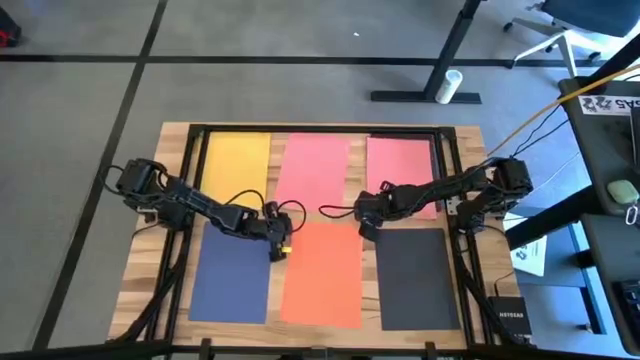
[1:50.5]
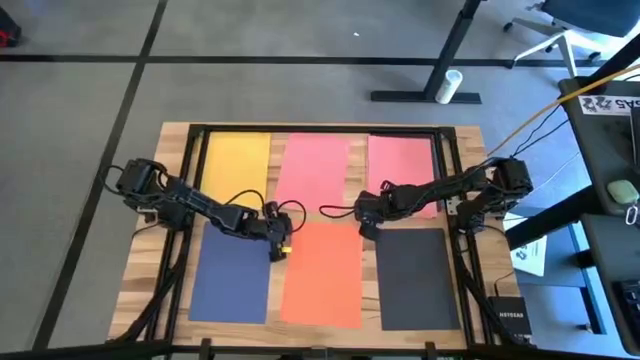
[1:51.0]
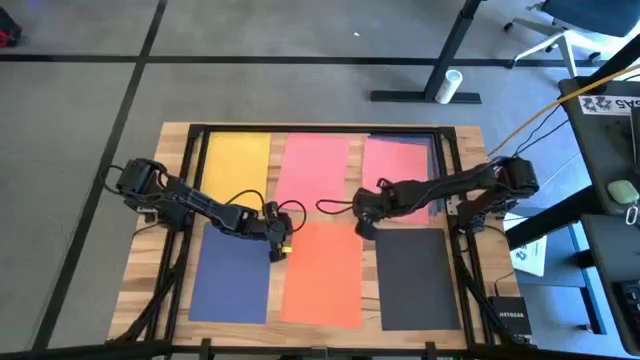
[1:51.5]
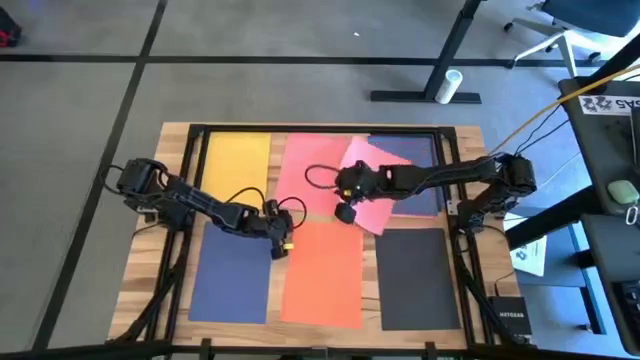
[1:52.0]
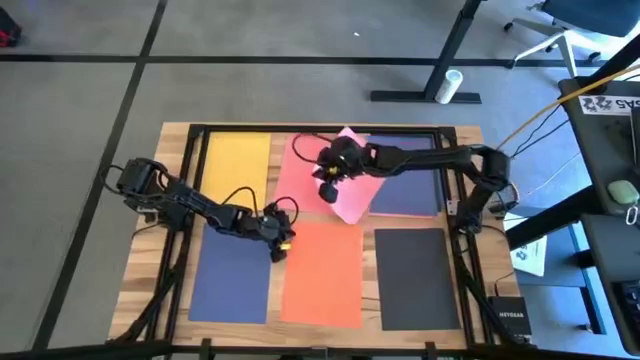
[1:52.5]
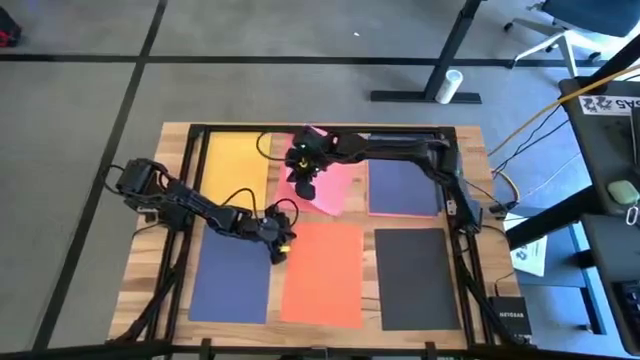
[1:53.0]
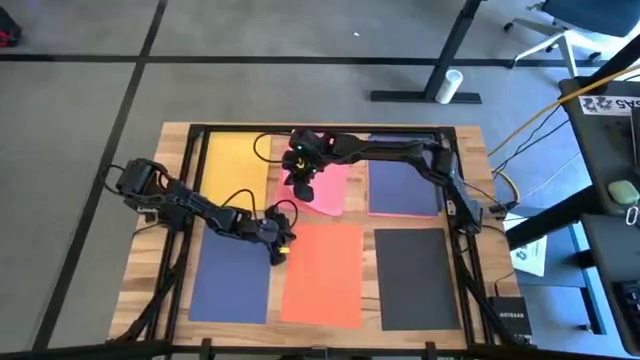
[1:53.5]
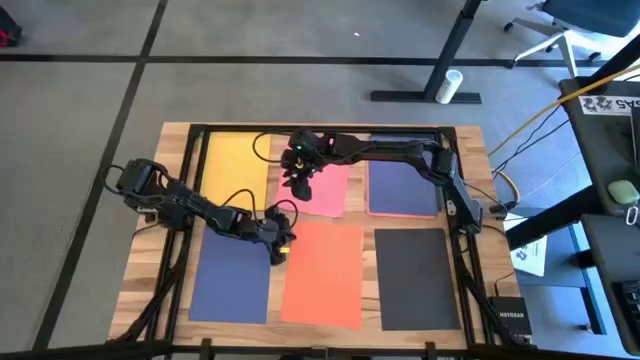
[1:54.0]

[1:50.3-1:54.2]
Task: Organize paper
Stack the pink paper on top of the pink paper

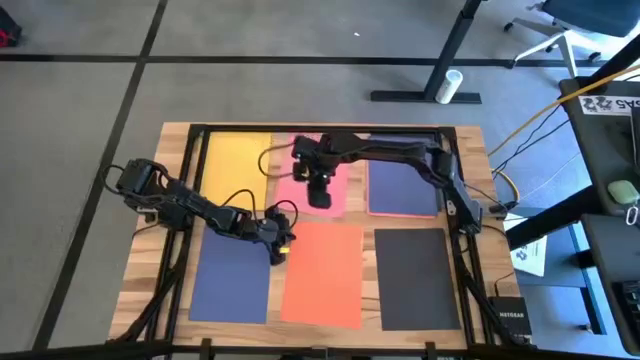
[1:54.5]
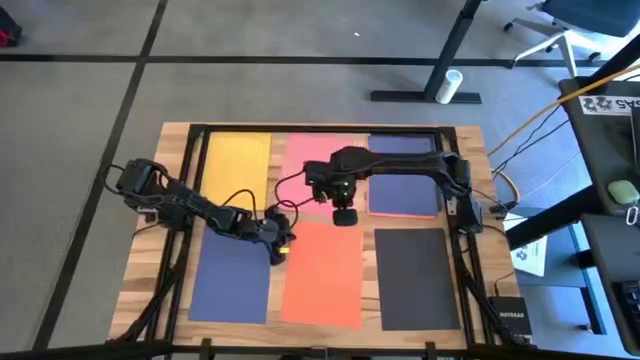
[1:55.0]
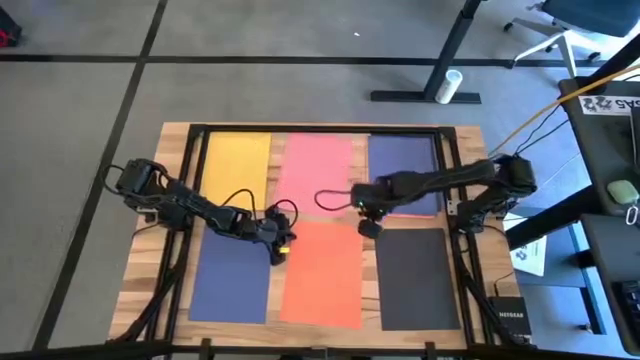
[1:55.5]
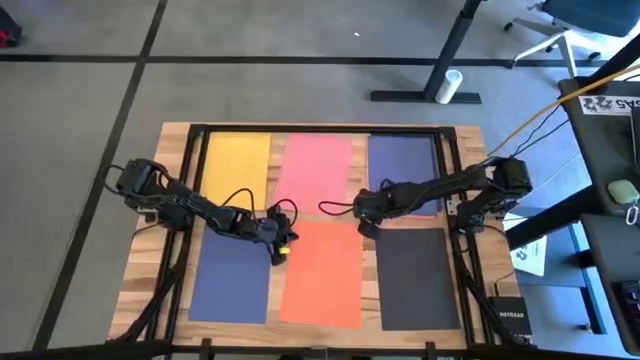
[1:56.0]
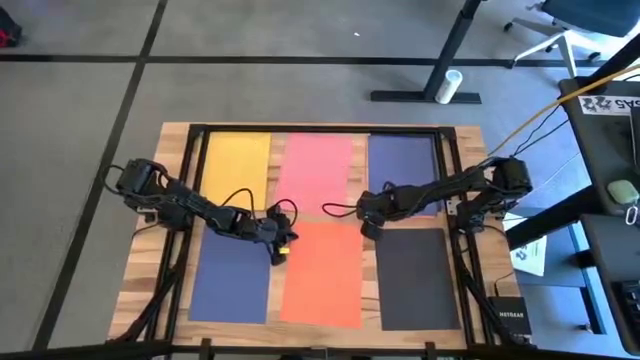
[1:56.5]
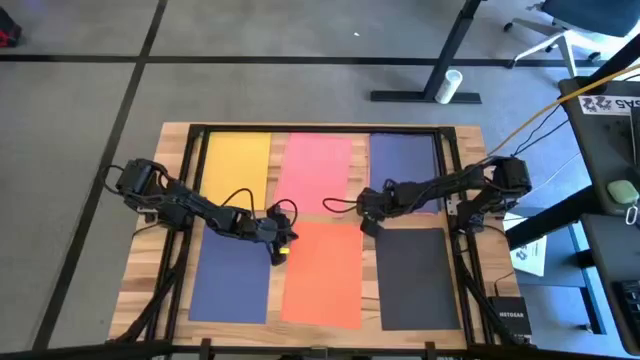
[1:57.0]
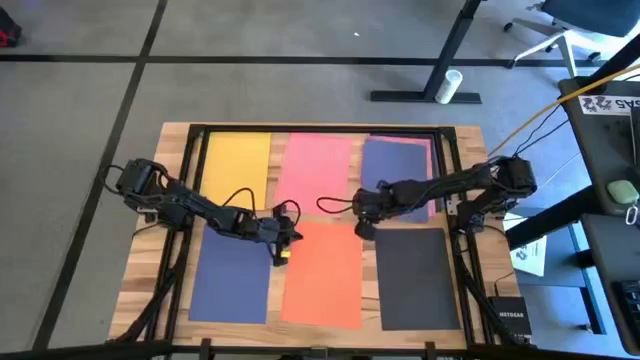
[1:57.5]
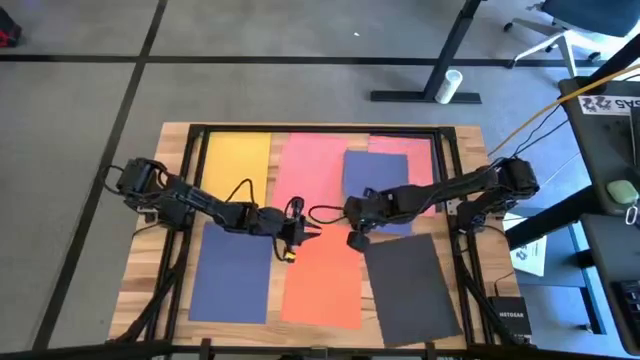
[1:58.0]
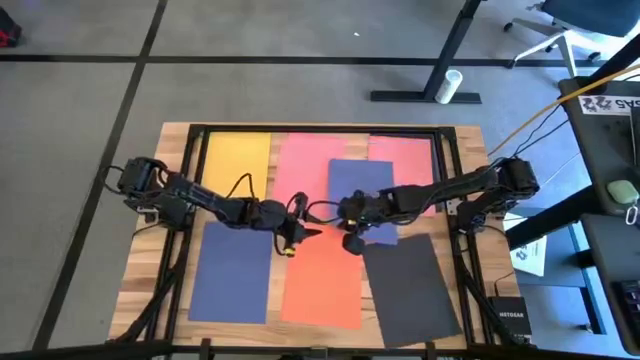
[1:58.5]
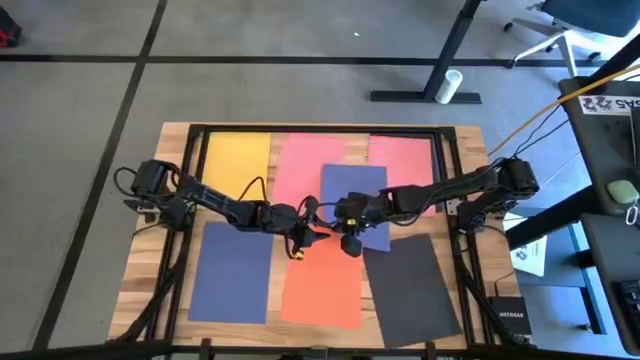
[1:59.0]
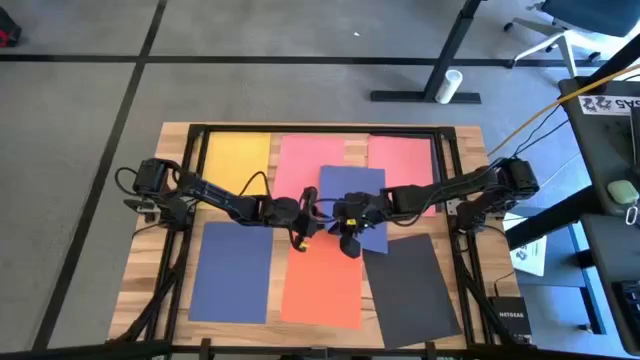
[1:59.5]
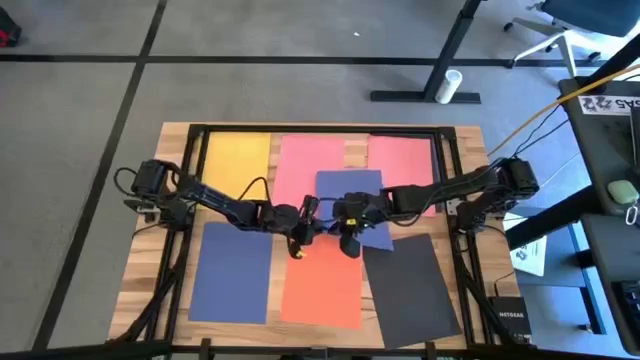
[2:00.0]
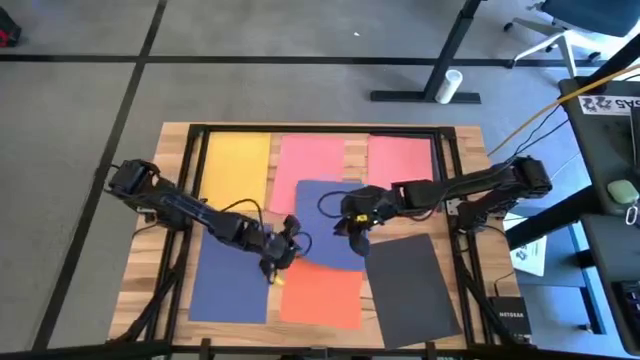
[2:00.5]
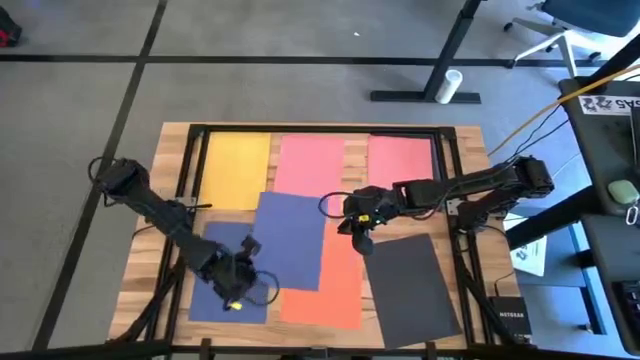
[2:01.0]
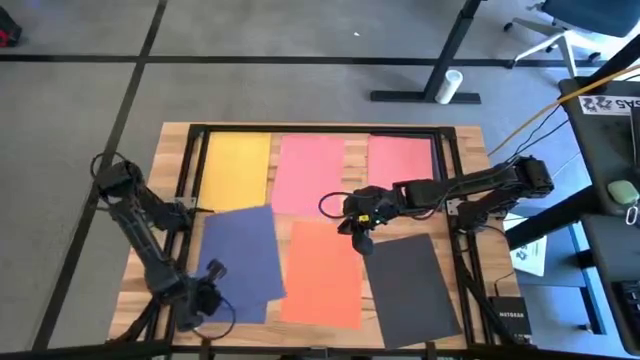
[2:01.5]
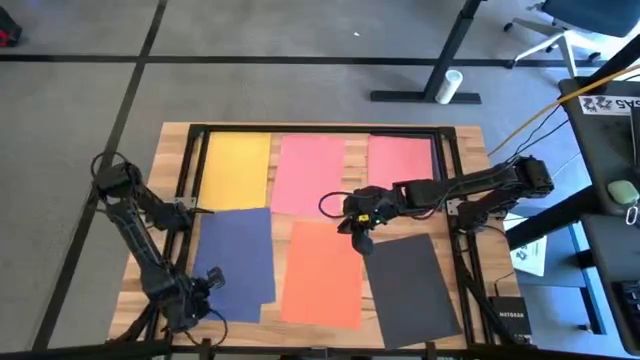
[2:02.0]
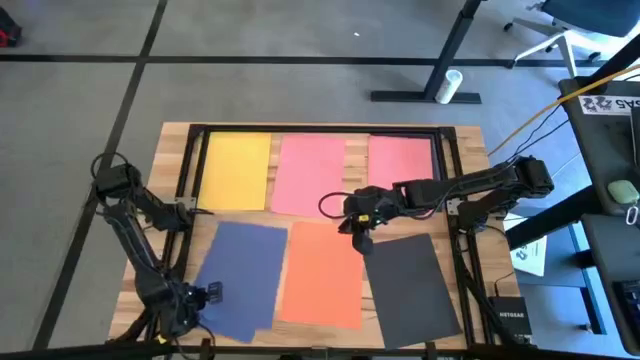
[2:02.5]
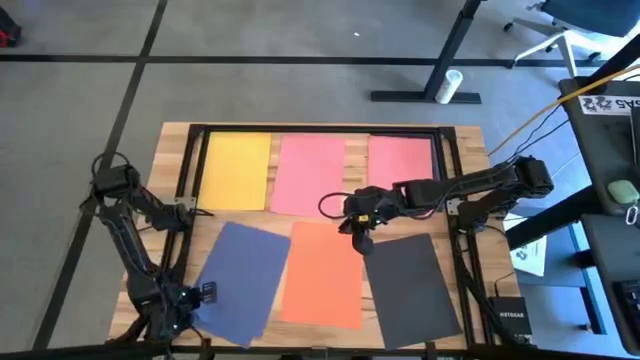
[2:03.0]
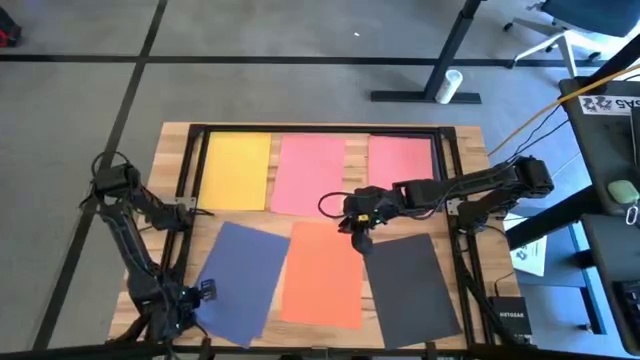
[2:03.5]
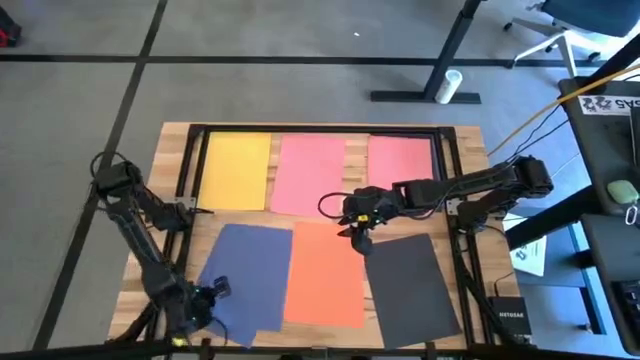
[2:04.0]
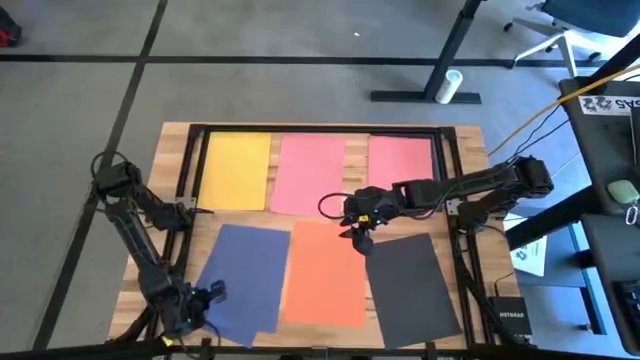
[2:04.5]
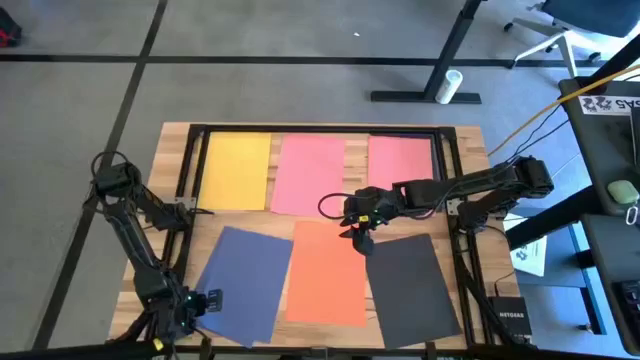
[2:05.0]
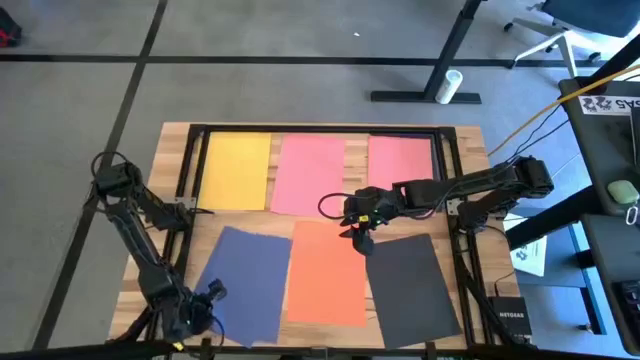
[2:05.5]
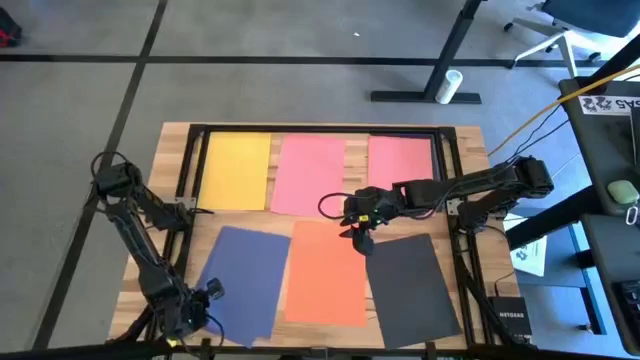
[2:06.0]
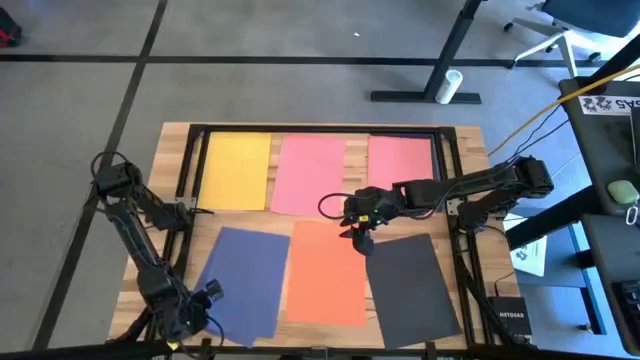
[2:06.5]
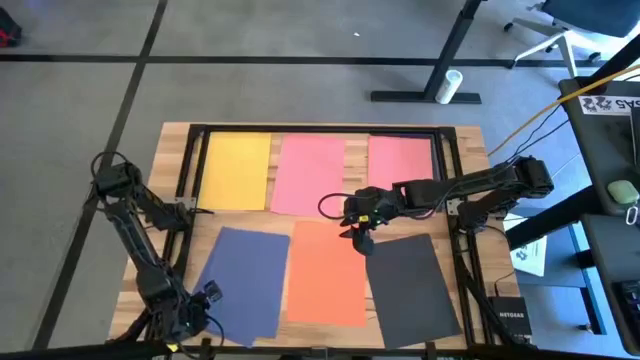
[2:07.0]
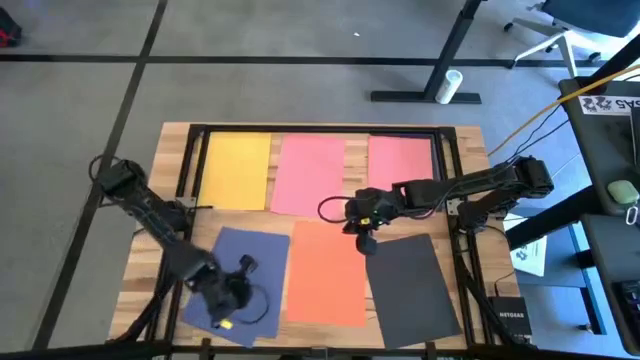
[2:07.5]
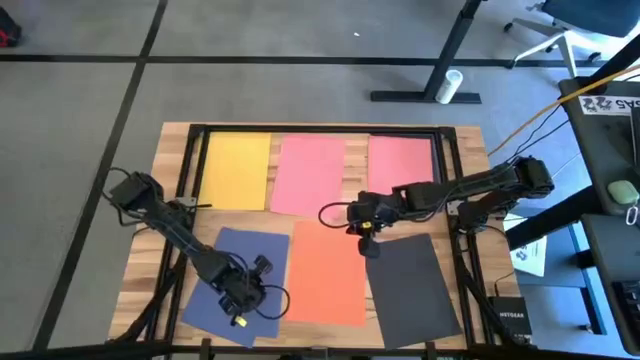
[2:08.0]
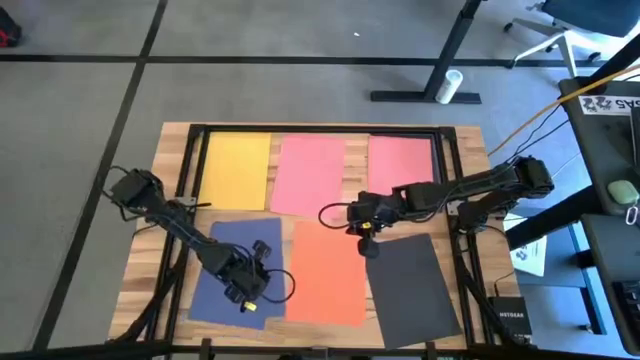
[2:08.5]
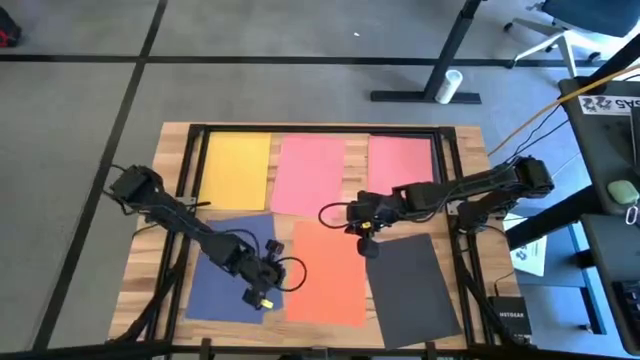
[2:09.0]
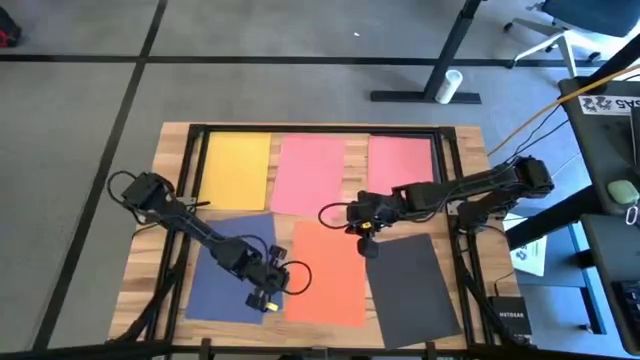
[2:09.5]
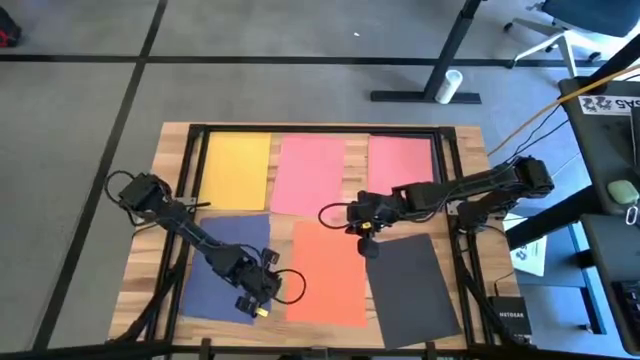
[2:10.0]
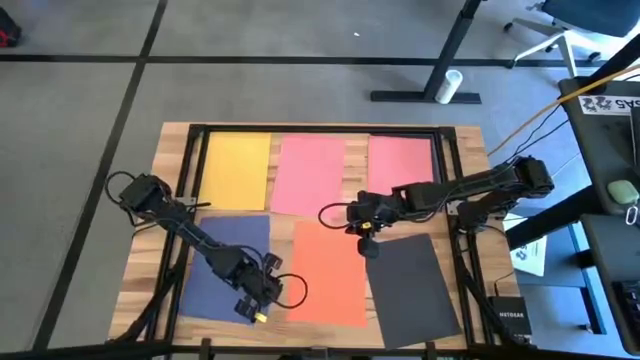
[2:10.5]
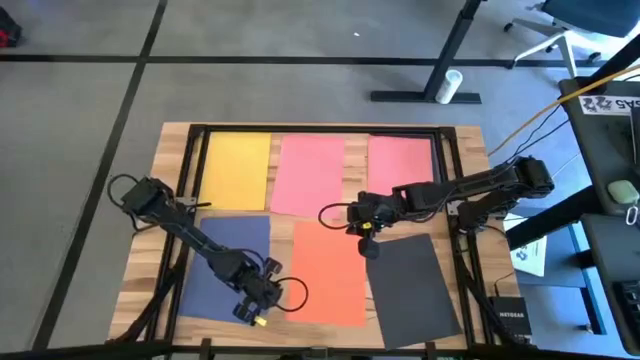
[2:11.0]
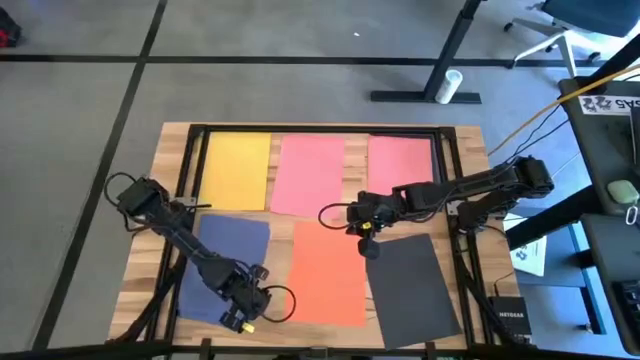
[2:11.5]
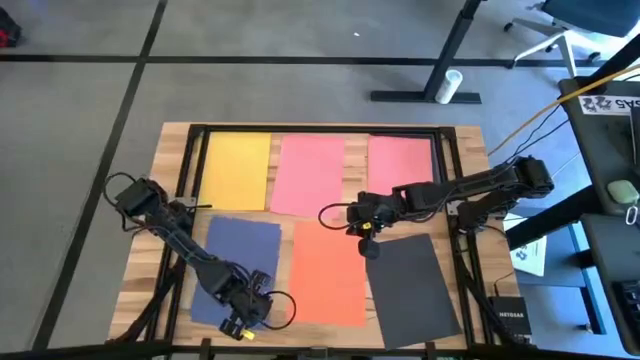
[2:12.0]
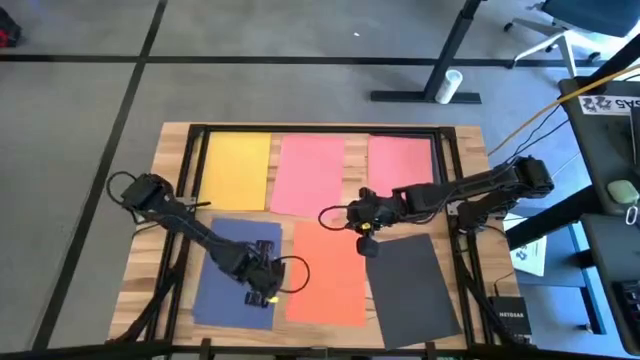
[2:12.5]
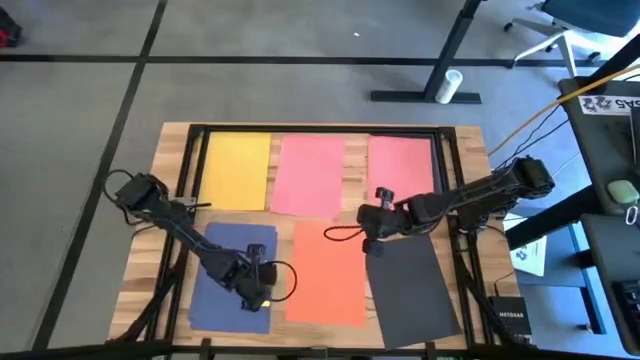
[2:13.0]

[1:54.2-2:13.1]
Stack the violet paper on top of the violet paper
